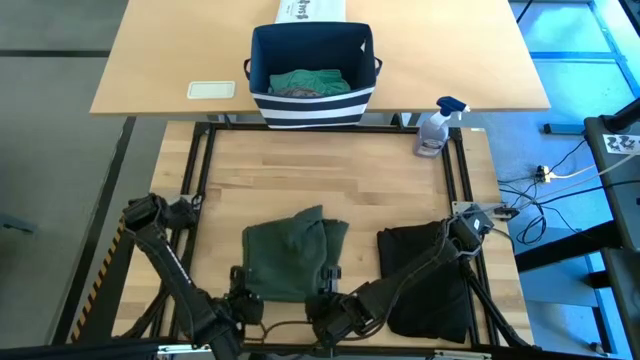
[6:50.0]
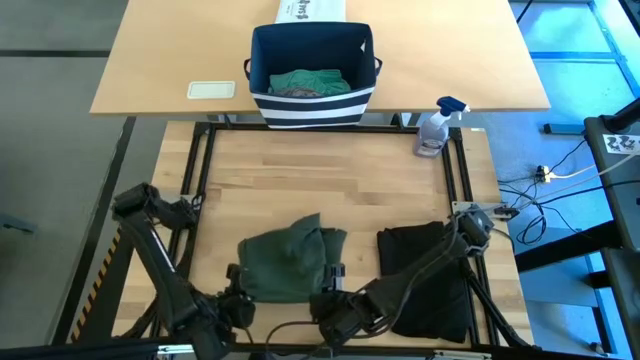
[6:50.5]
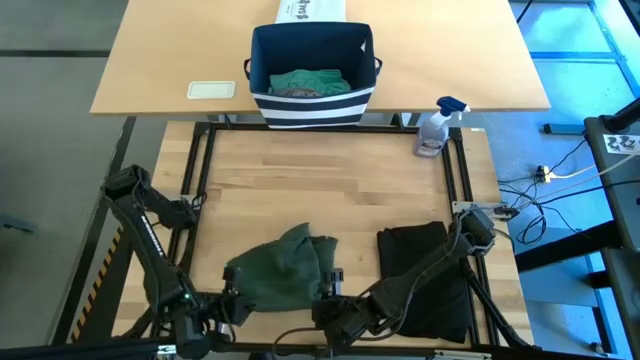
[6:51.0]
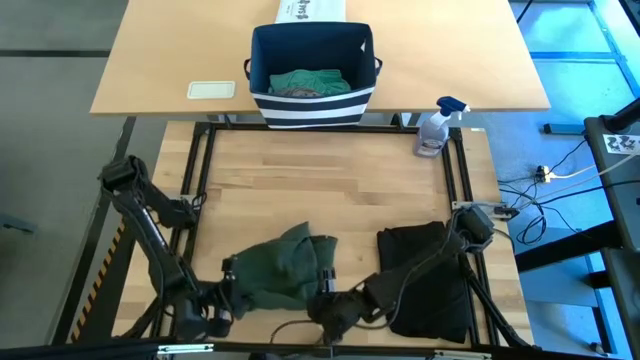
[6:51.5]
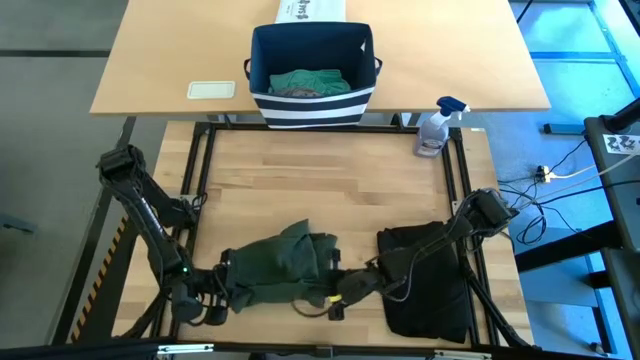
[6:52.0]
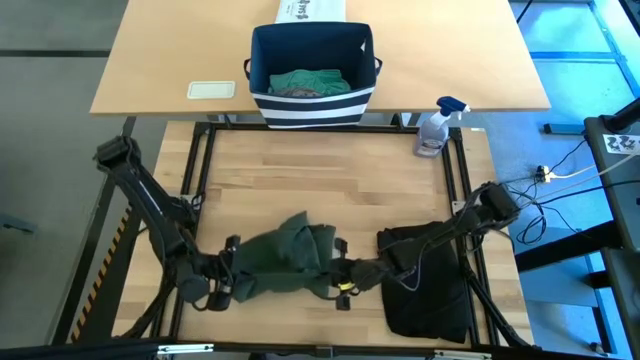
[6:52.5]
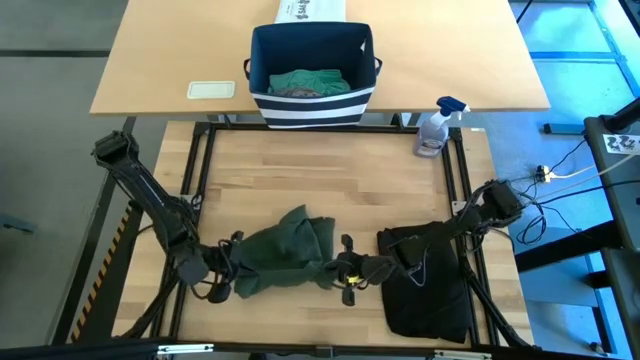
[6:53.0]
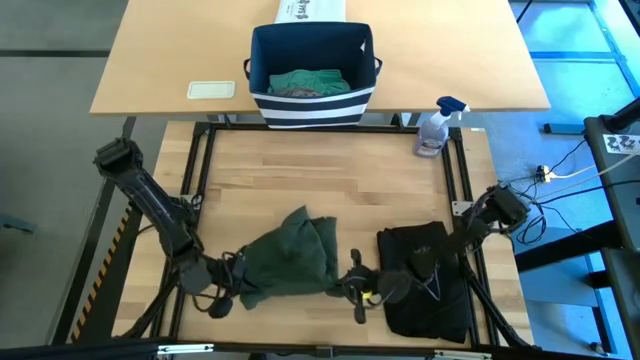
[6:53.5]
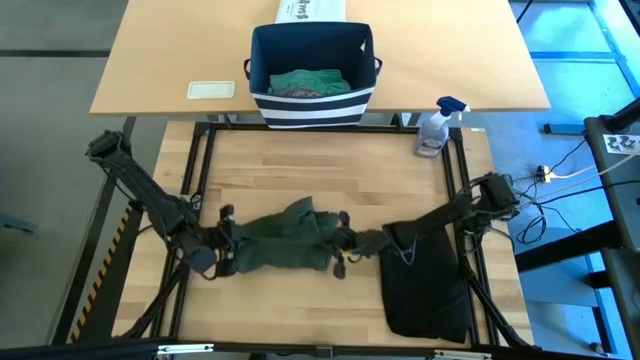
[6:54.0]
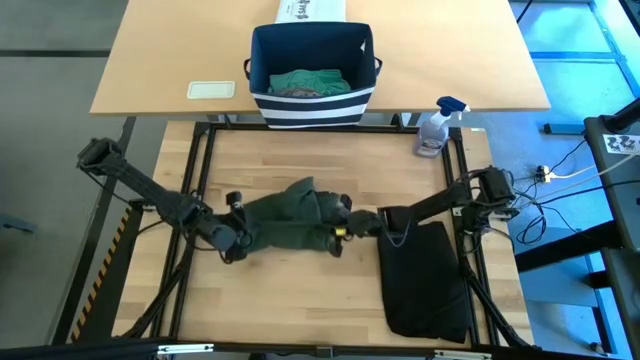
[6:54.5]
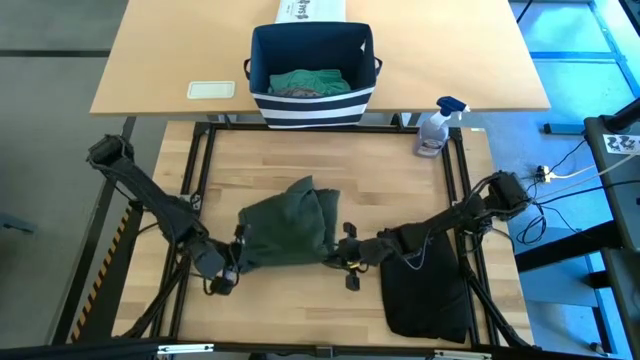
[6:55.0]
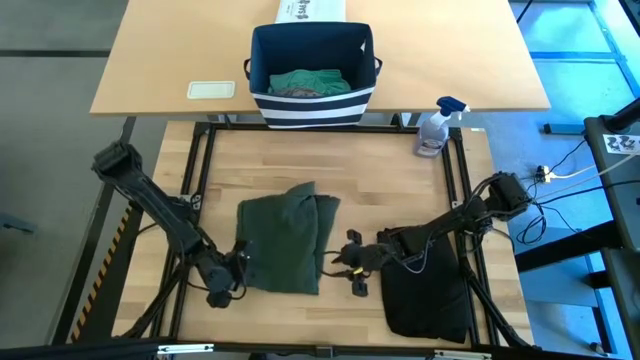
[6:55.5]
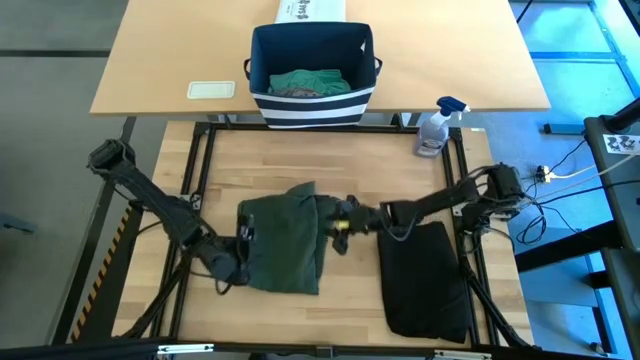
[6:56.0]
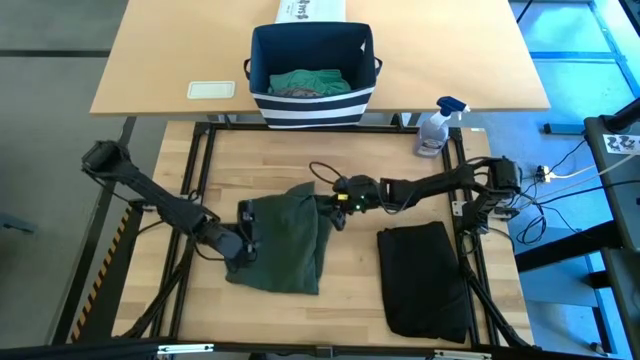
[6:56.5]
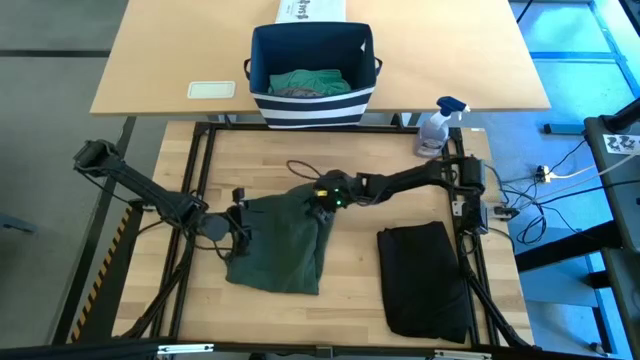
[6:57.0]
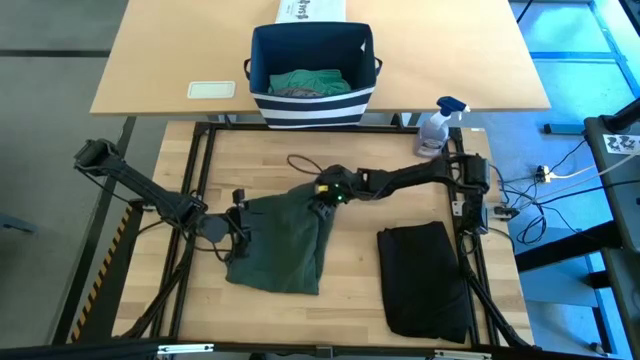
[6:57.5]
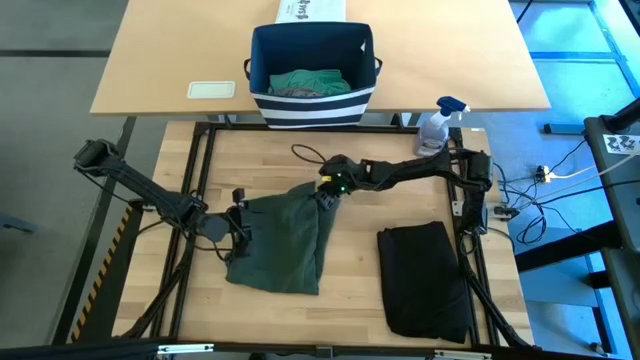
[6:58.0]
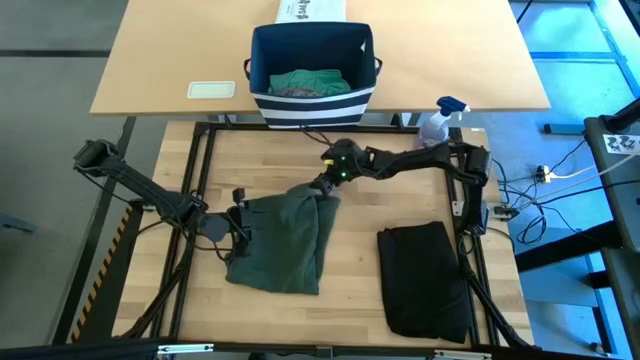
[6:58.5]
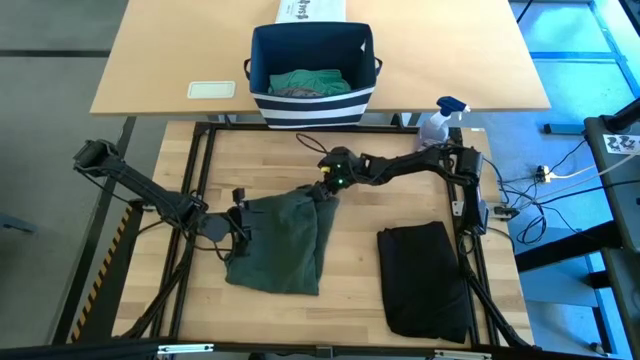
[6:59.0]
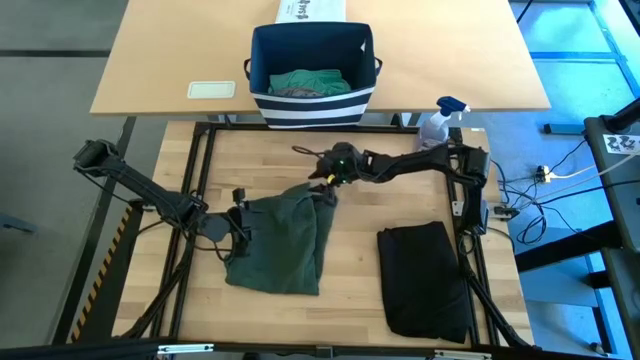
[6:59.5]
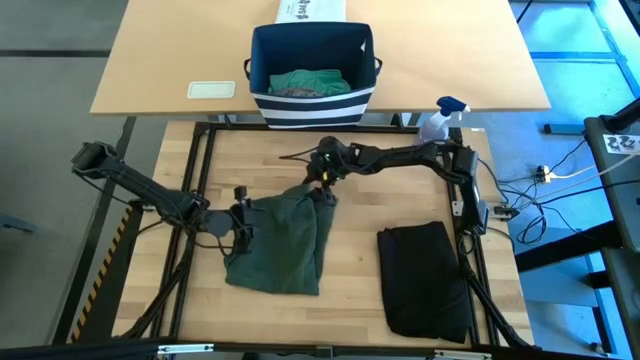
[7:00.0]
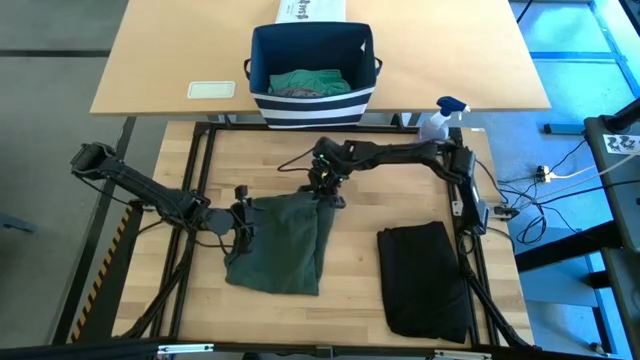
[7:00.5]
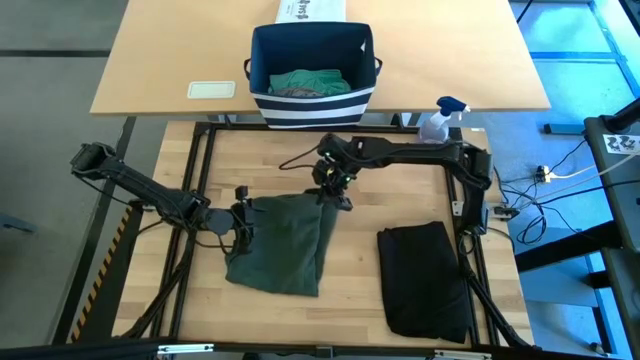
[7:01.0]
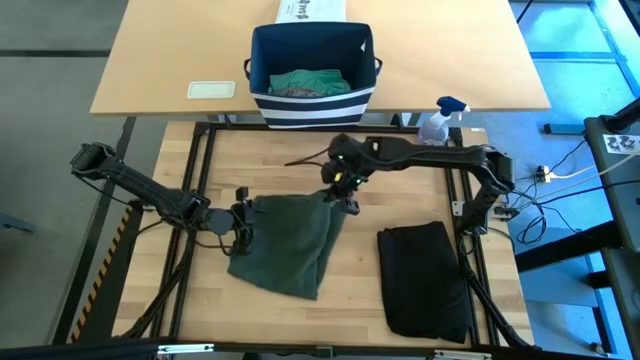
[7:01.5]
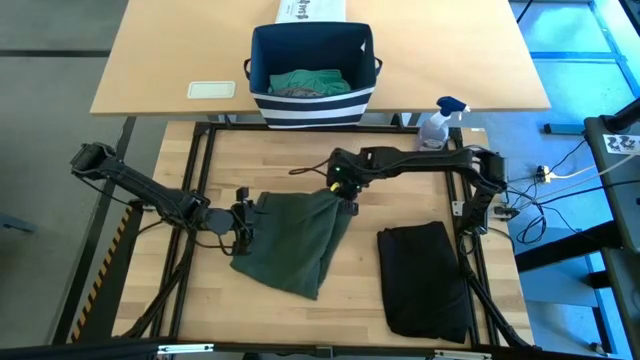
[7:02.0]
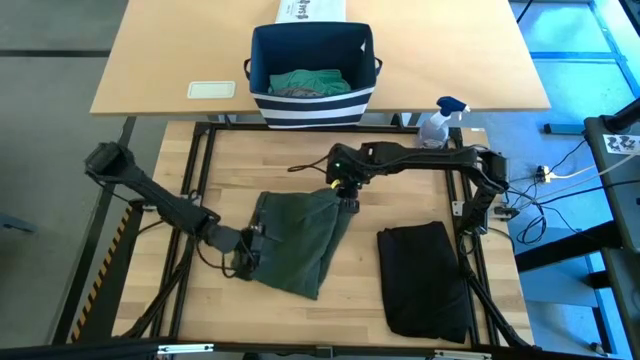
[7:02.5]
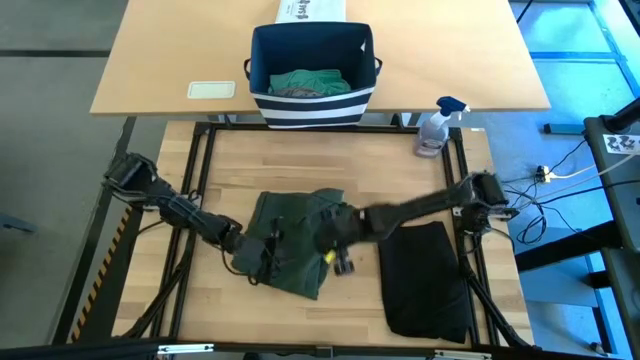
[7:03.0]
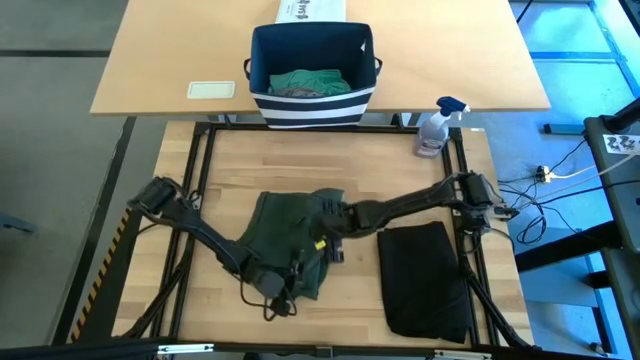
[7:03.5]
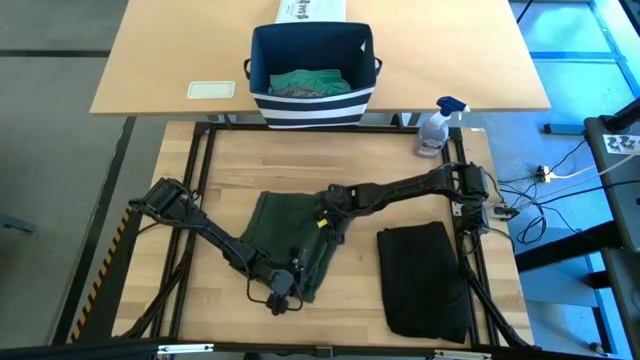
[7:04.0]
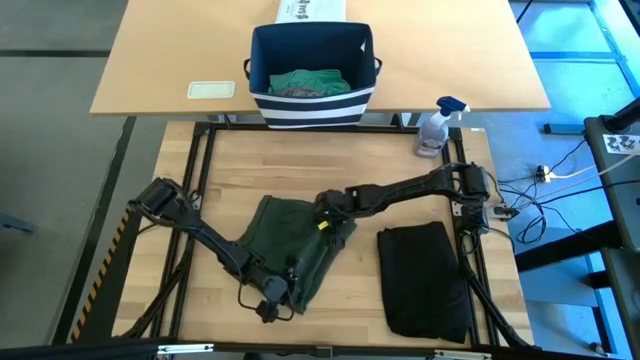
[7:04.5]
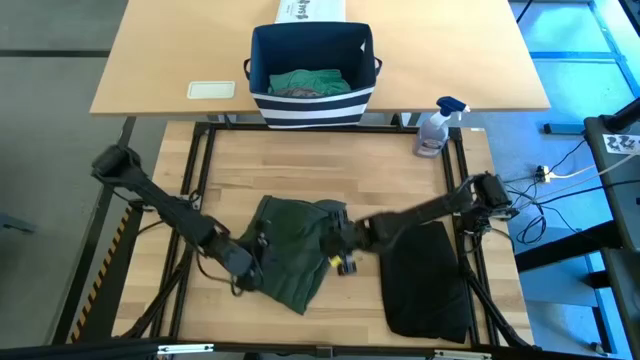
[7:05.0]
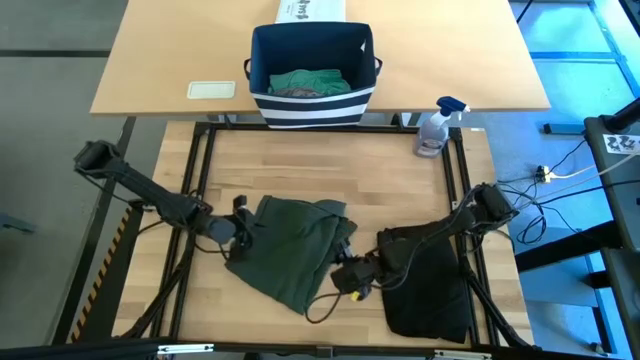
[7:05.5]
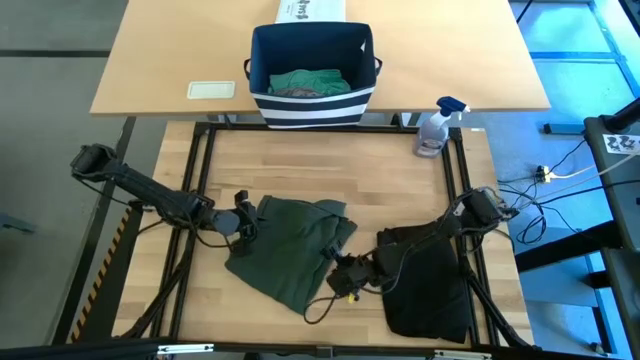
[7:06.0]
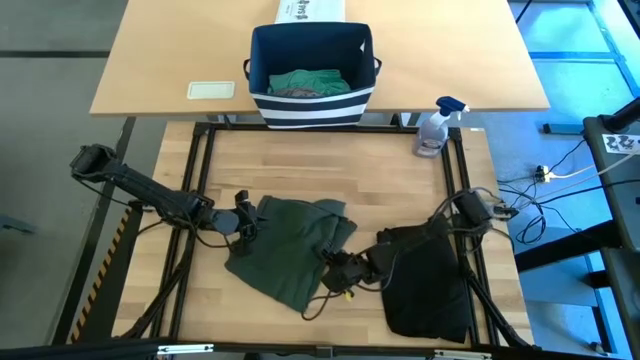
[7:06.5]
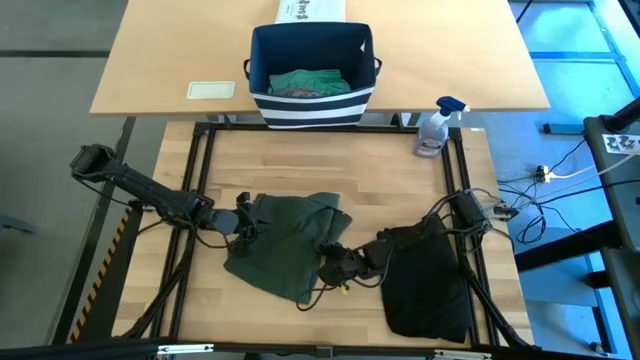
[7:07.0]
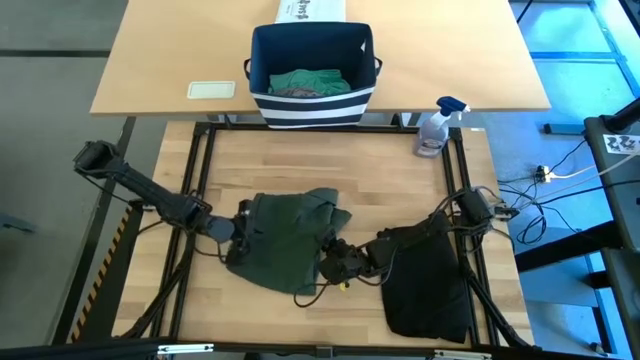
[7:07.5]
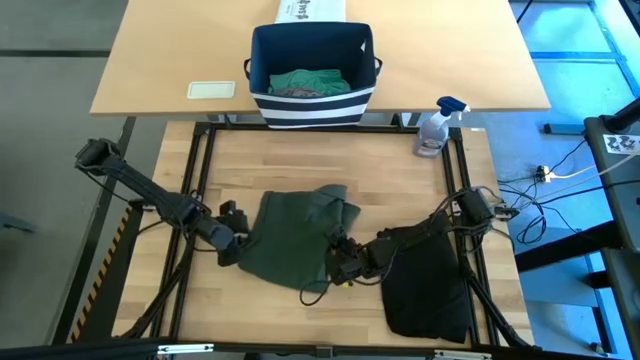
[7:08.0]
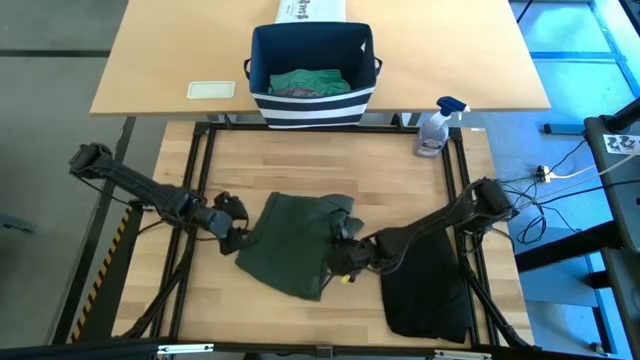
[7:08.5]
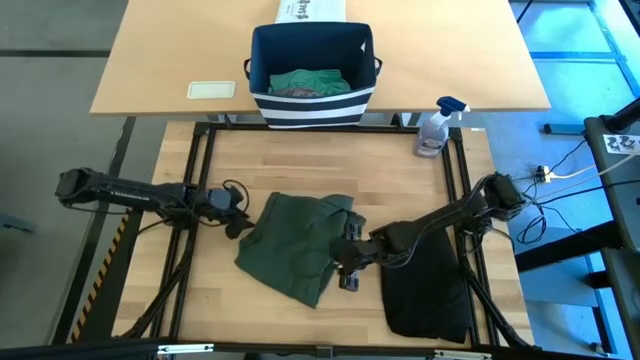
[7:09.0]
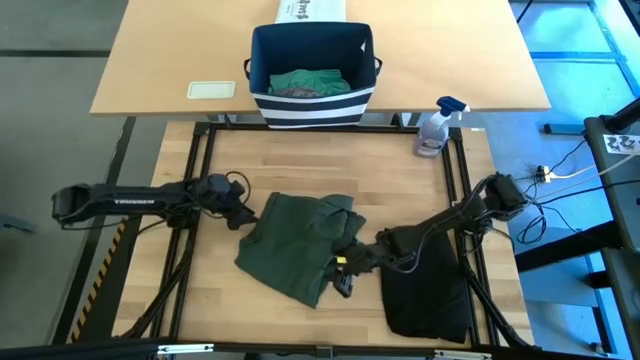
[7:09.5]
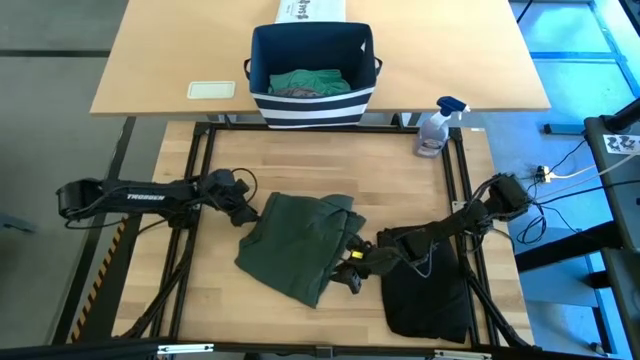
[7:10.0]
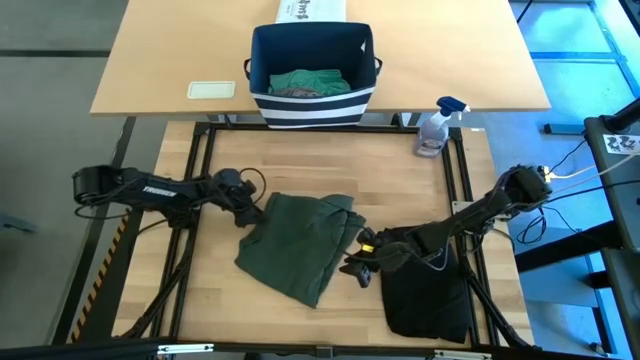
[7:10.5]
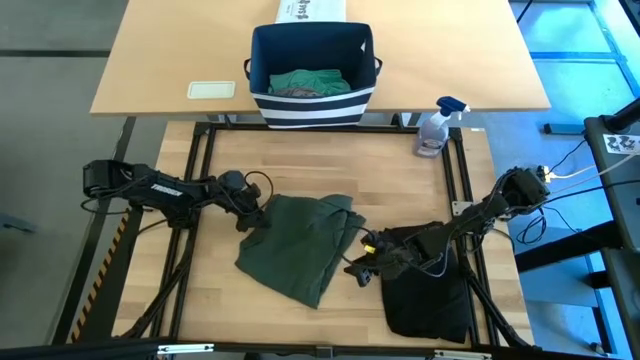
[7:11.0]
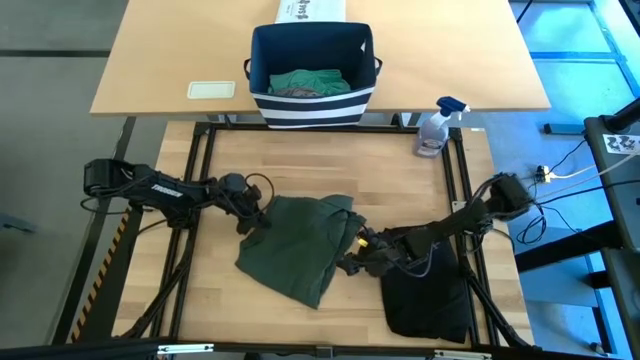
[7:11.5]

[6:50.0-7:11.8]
Task: Fold Laundry from Bin
Stack the folded green polo shirt on top of the folded black shirt
